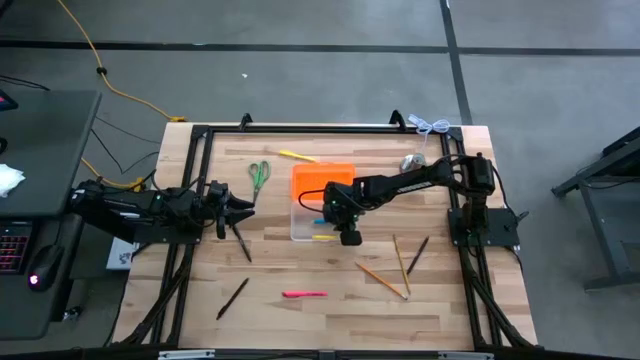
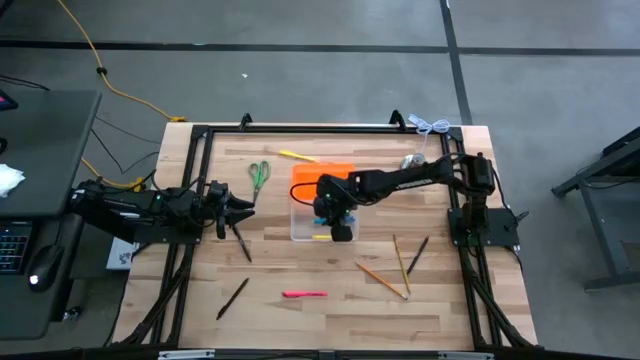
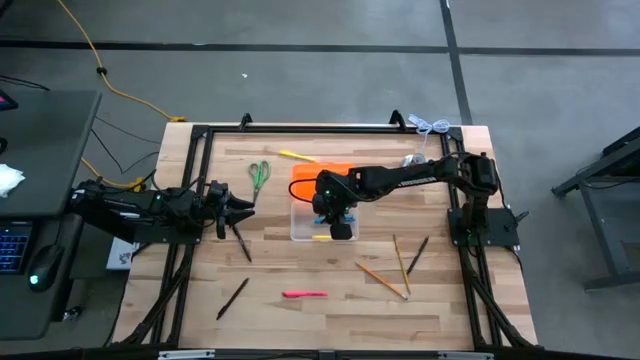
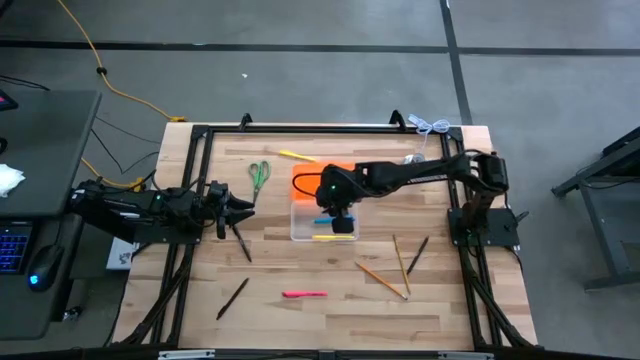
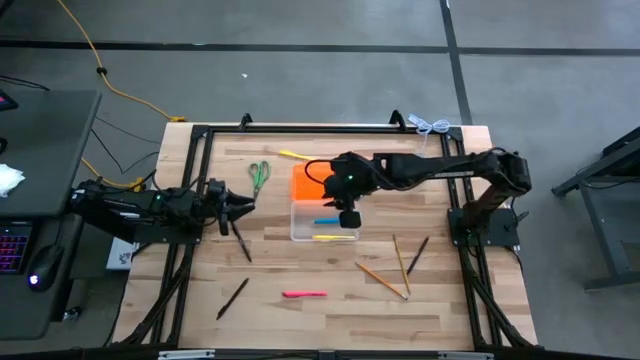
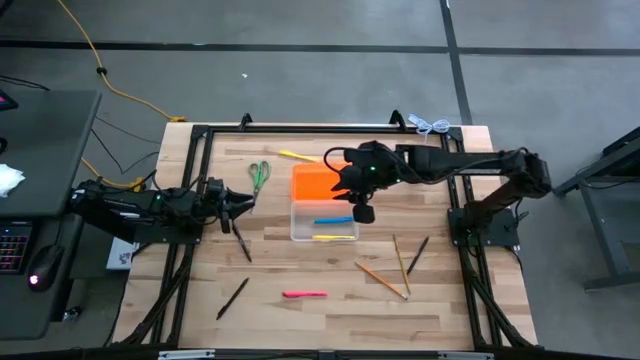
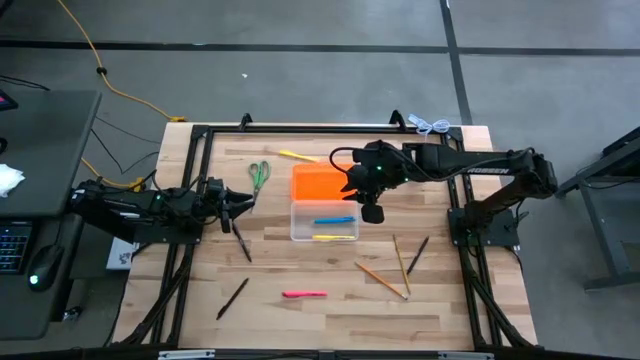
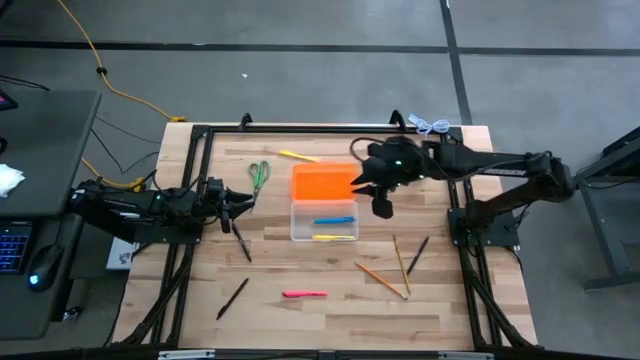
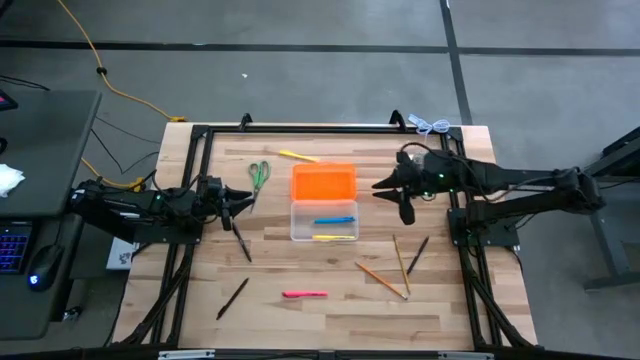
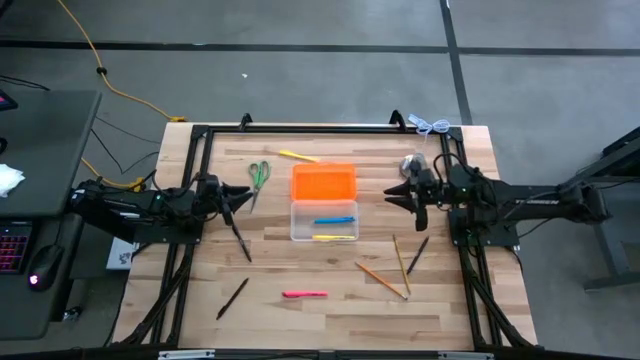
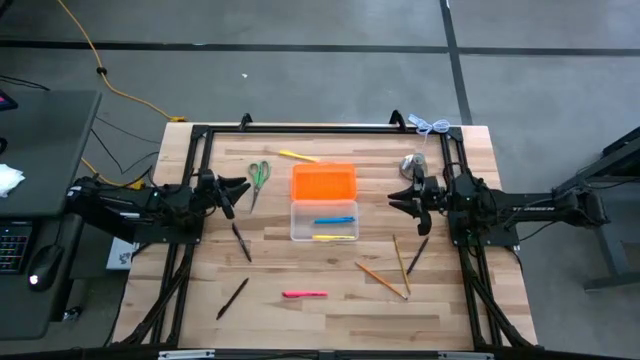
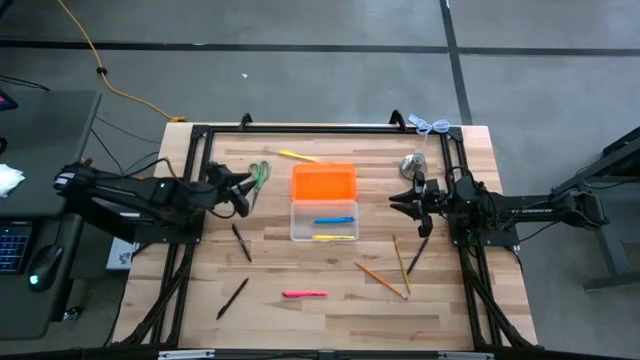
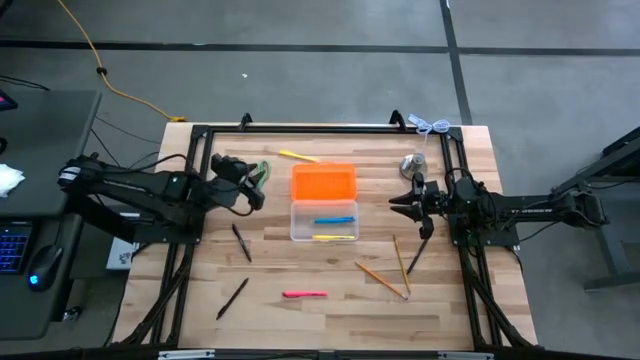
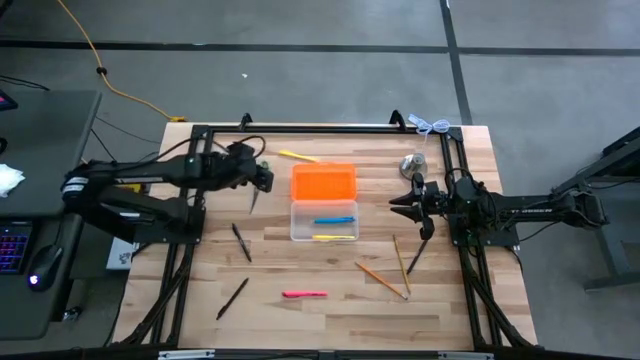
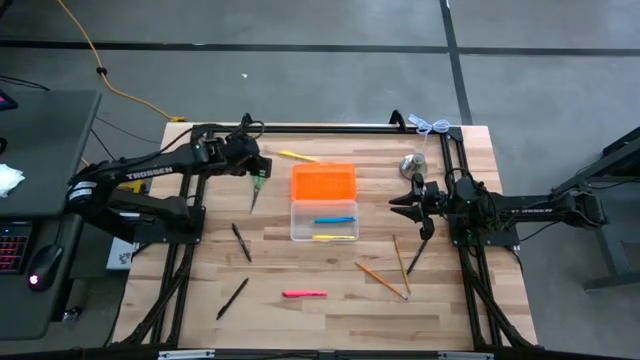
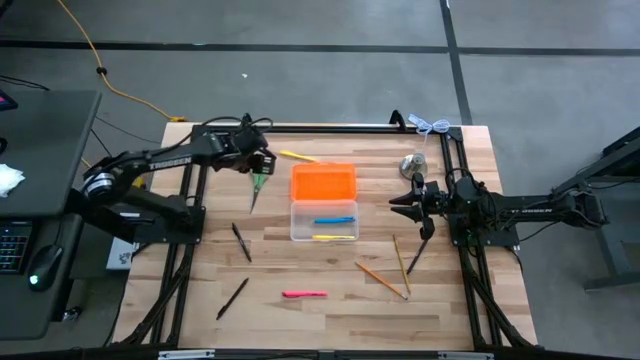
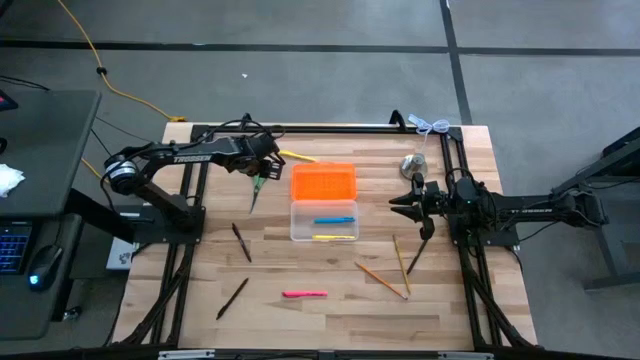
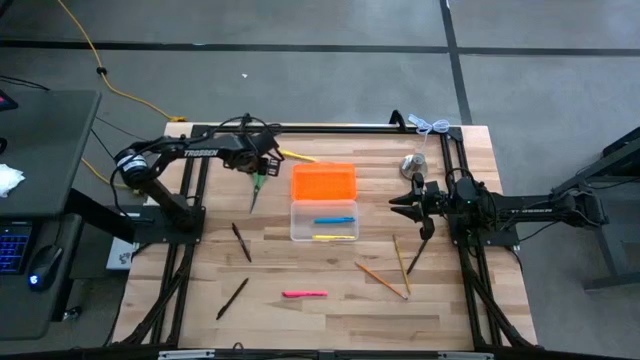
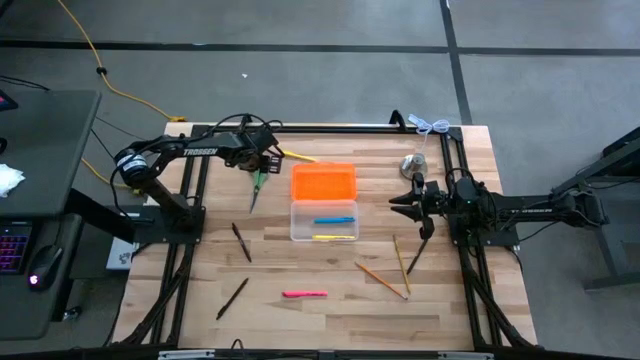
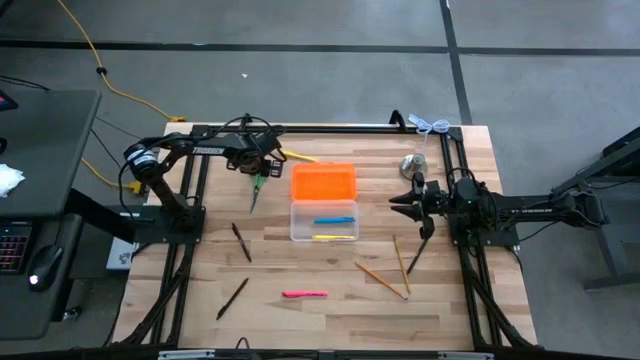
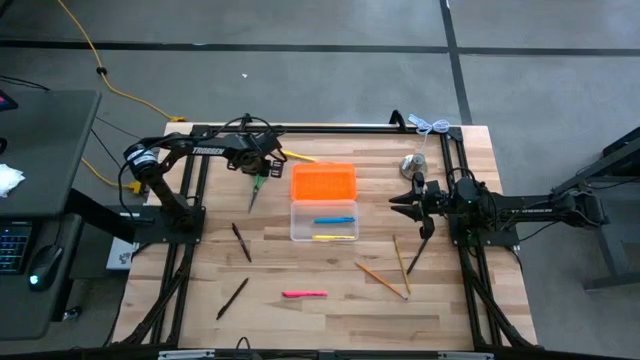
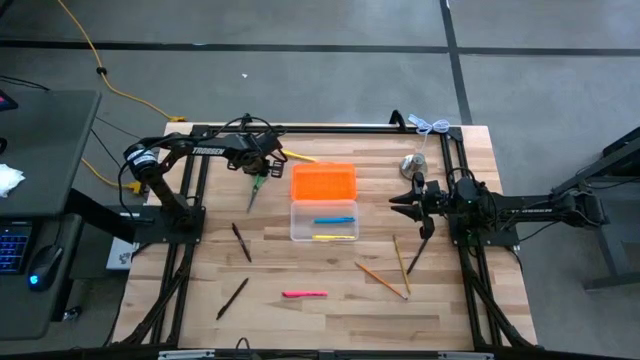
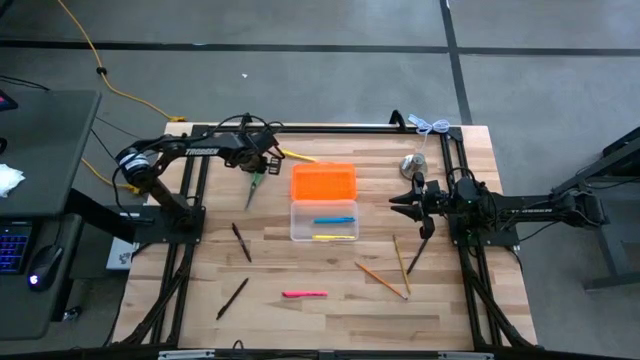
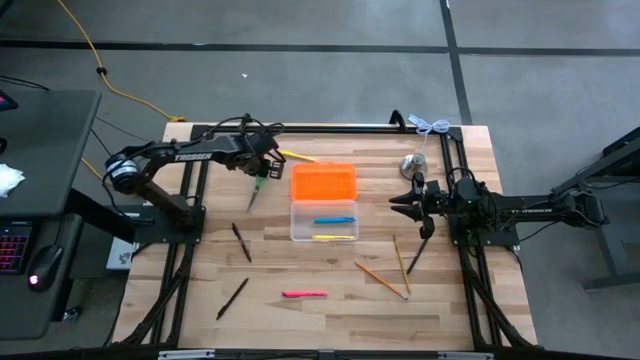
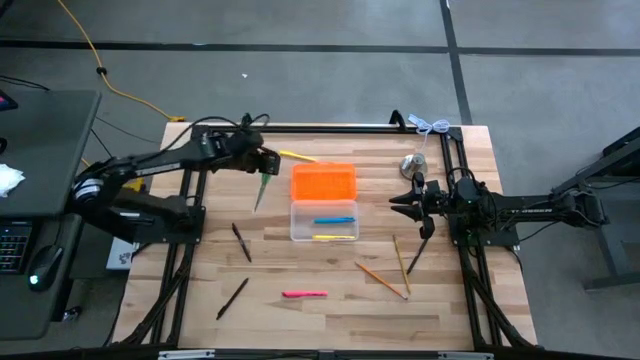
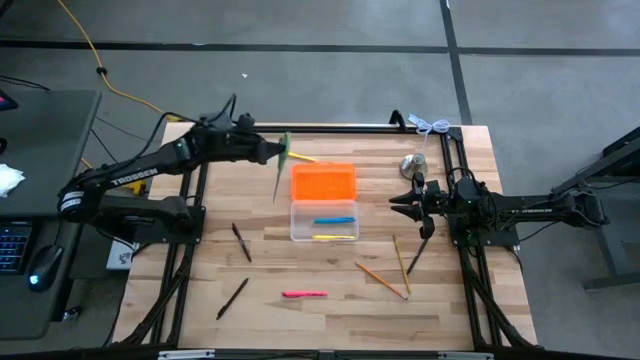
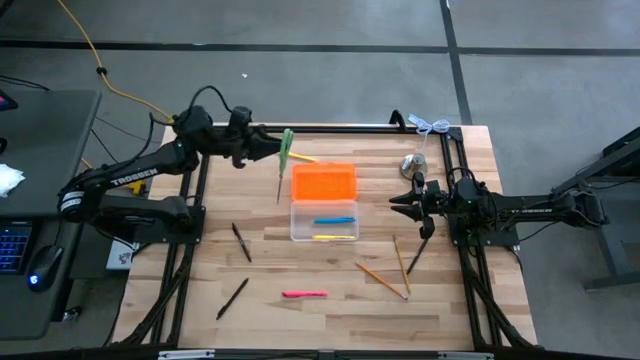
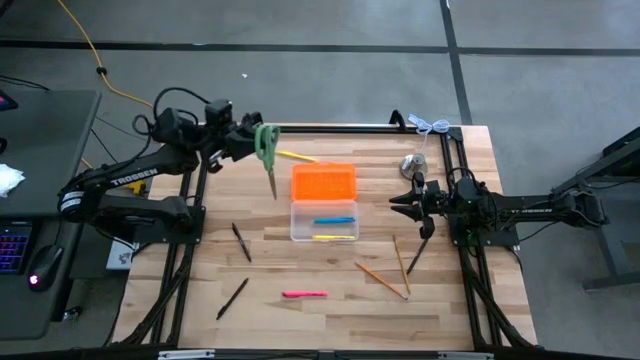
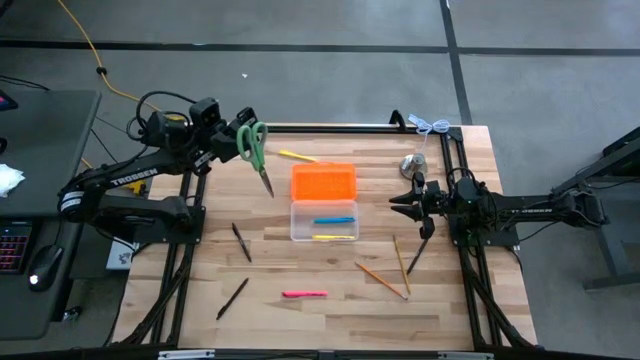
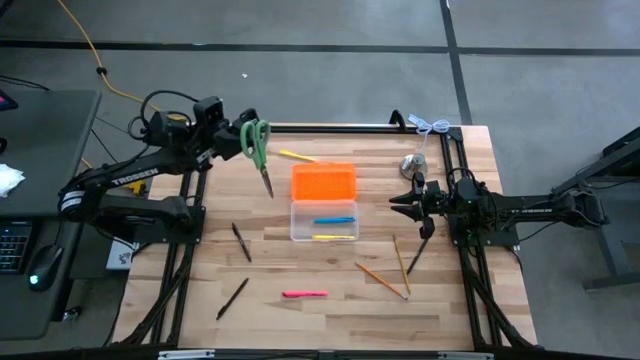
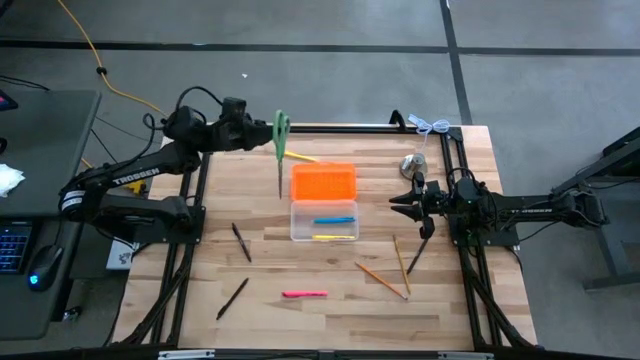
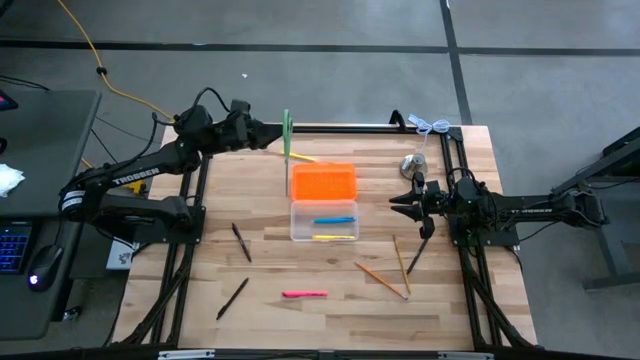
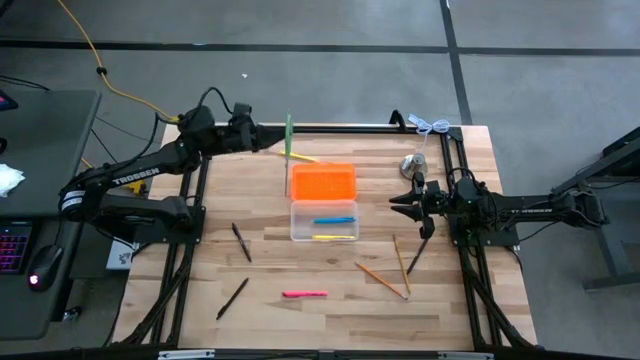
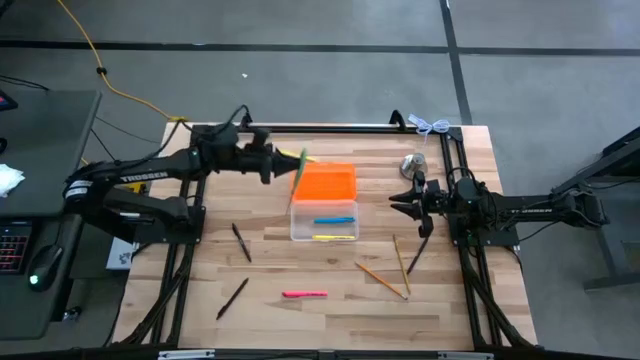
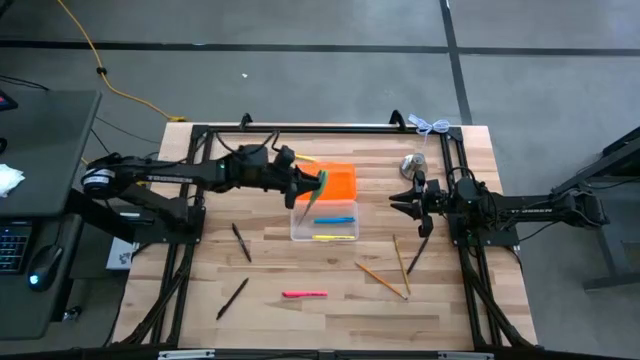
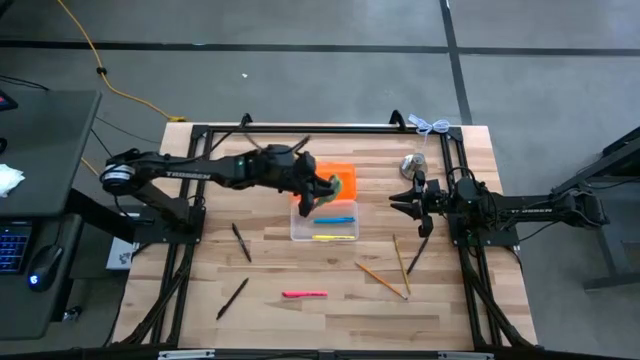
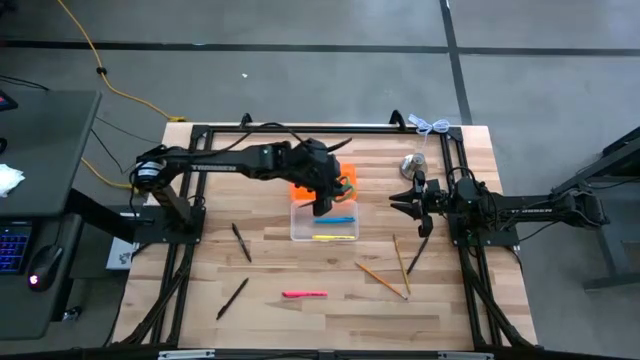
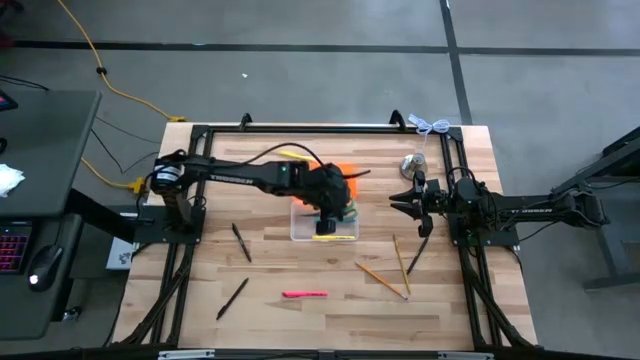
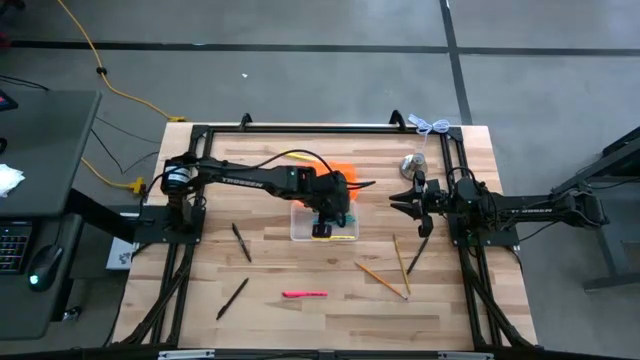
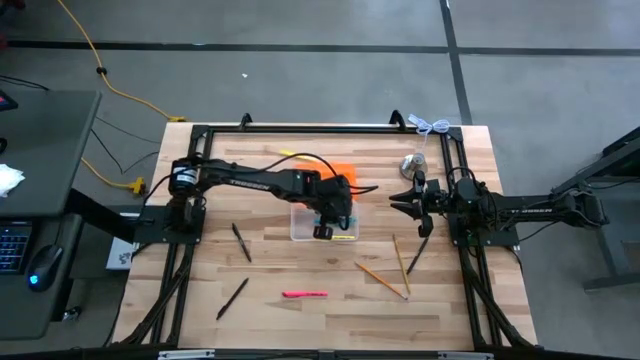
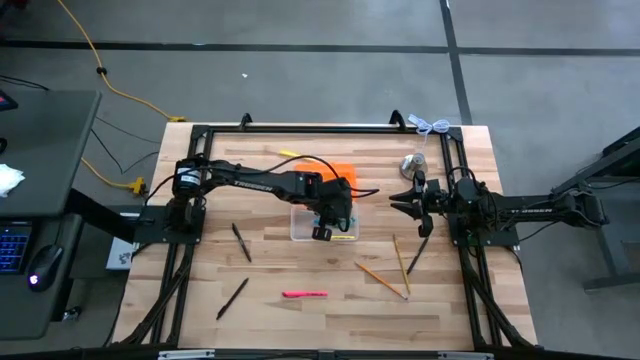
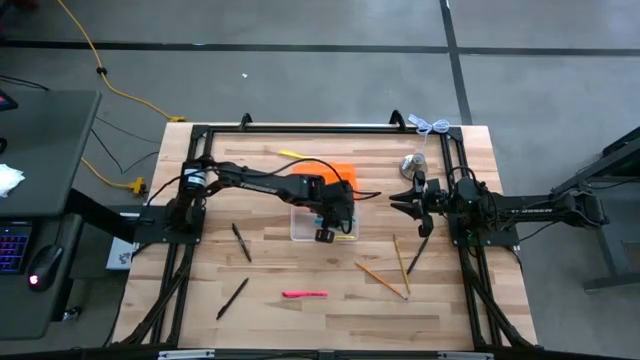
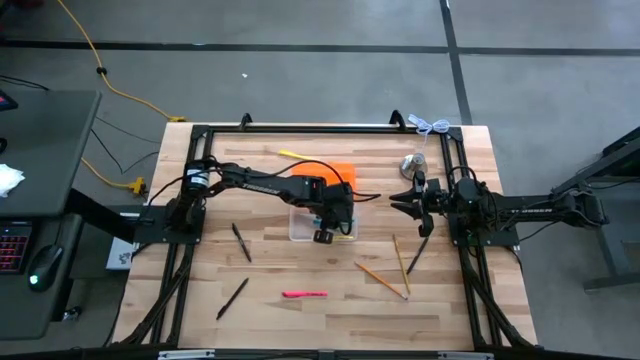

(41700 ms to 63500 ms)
Task: Pick & place school supplies into a supply box
Put the green scissors into the orange supply box
